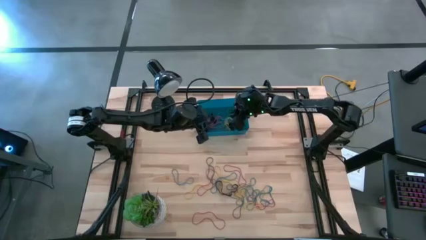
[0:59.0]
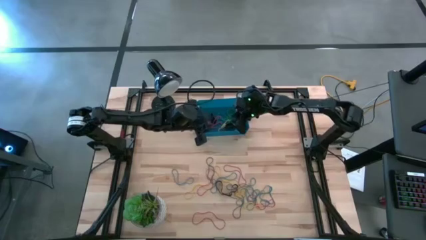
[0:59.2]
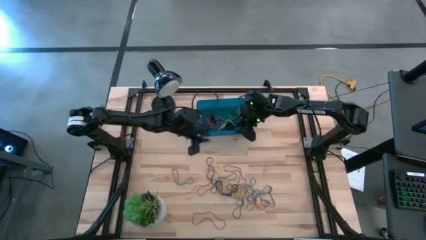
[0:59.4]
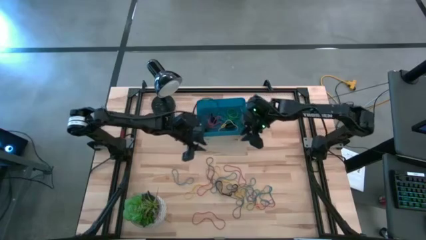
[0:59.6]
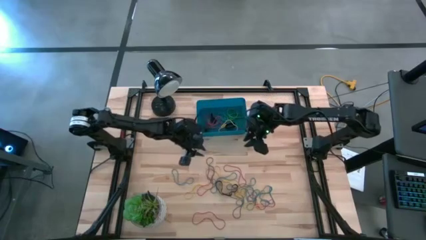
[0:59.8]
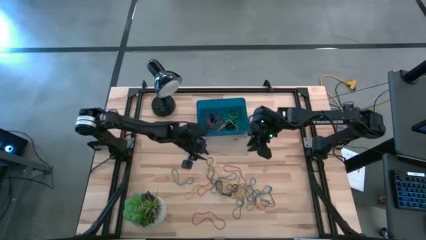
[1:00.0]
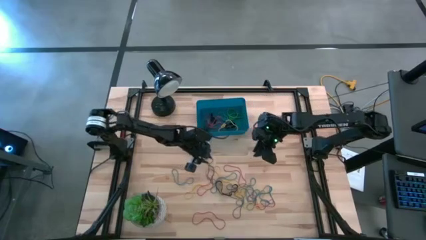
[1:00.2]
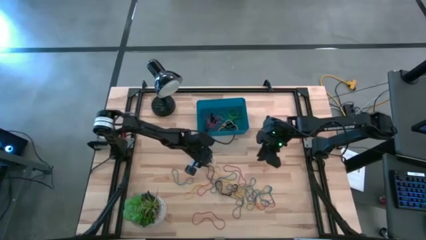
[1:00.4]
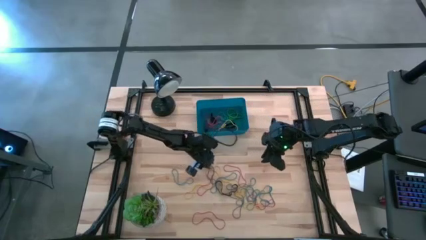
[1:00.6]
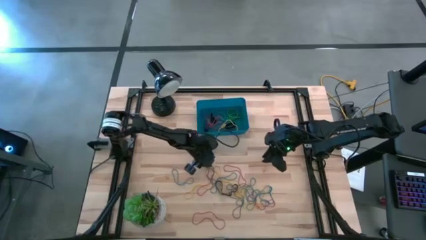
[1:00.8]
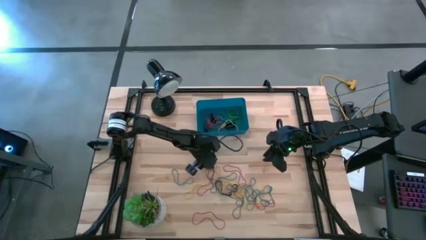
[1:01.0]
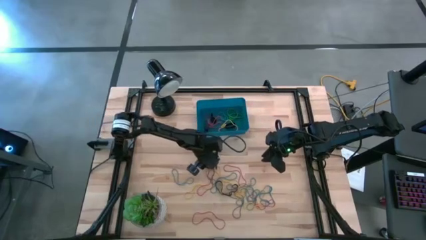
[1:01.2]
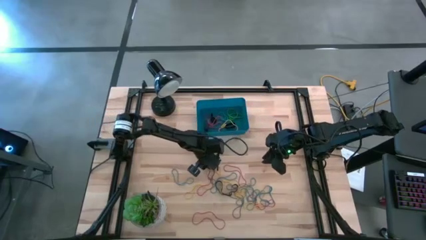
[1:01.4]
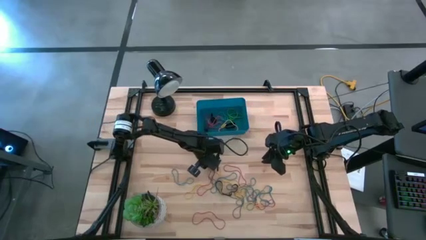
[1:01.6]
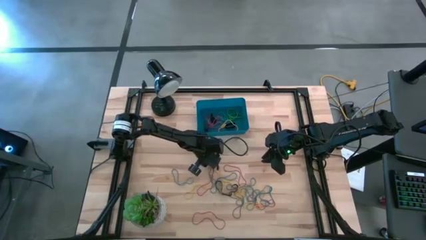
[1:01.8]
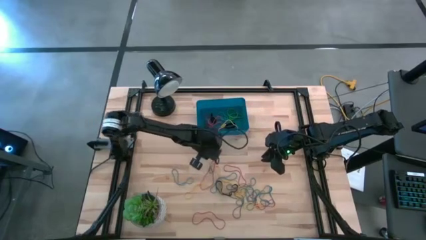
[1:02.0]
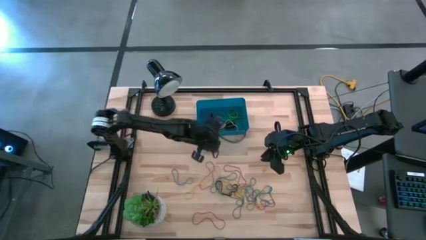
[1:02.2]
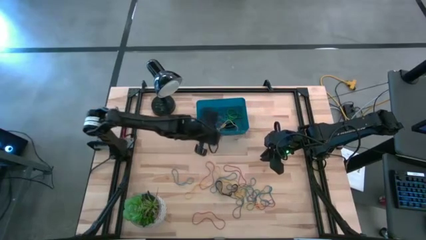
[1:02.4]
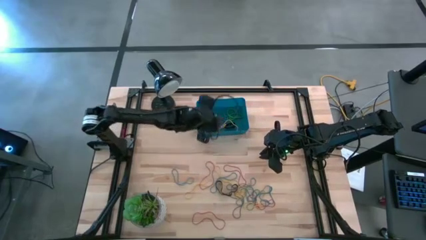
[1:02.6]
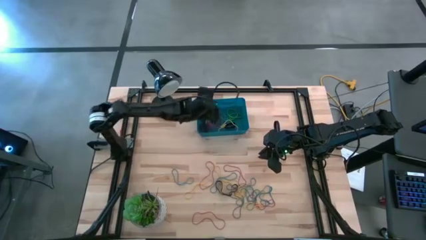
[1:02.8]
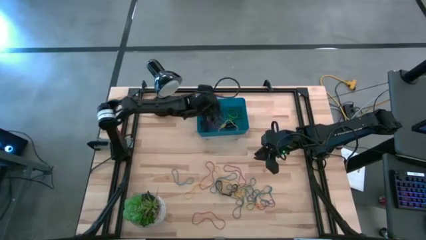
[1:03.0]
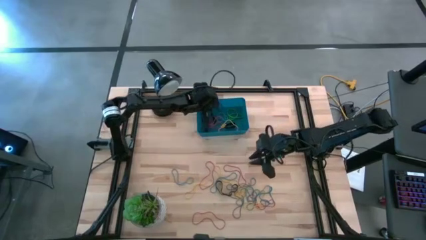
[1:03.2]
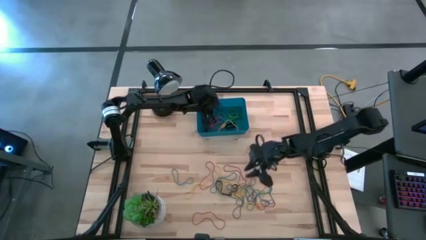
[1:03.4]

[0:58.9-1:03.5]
Task: Pick and place rubber bands into bin
Put the purple rubber band into the blue bin

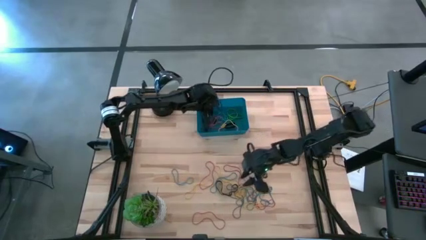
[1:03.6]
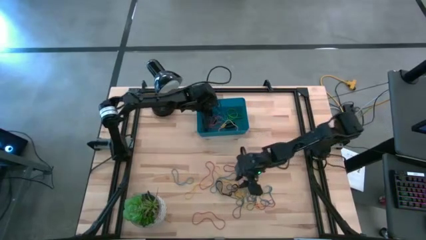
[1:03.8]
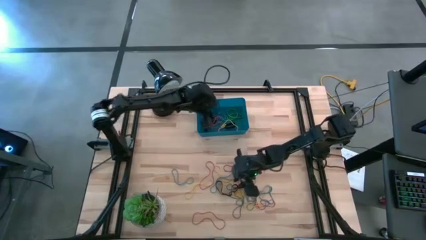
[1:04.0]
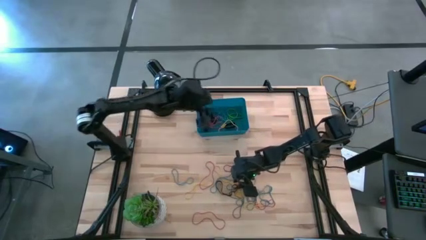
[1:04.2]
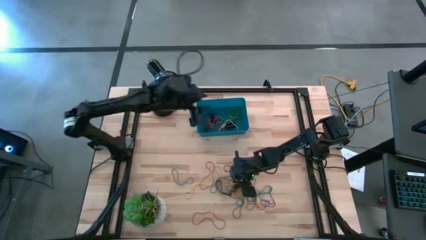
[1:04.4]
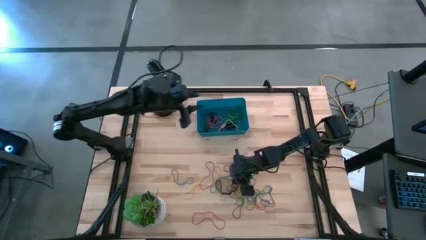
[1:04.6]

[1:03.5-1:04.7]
Put the black rubber band into the blue bin

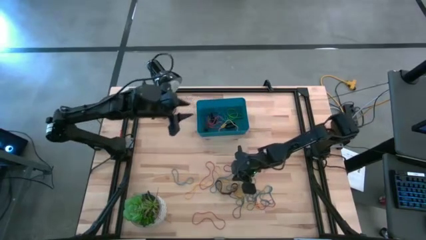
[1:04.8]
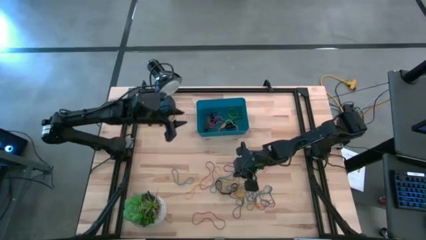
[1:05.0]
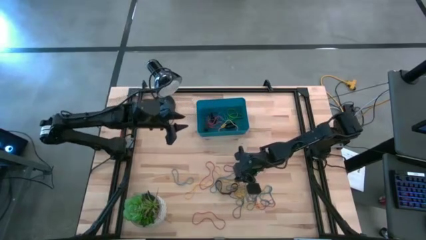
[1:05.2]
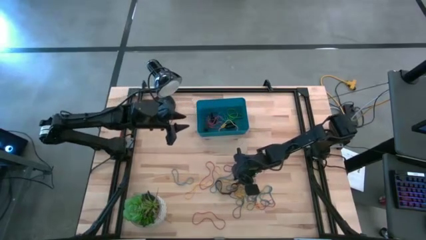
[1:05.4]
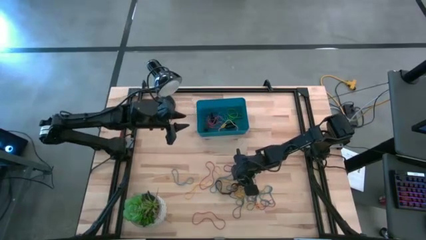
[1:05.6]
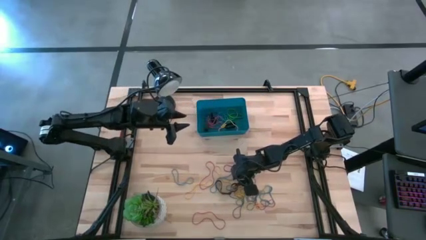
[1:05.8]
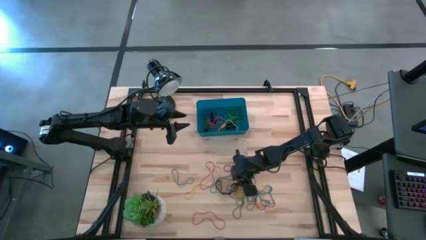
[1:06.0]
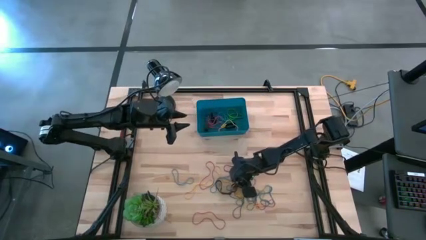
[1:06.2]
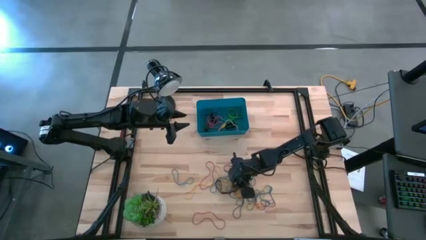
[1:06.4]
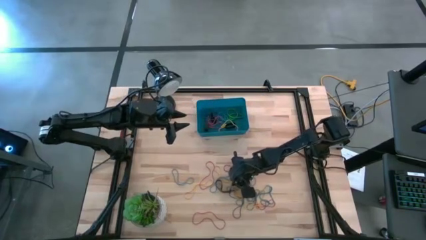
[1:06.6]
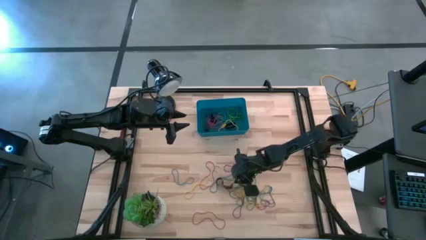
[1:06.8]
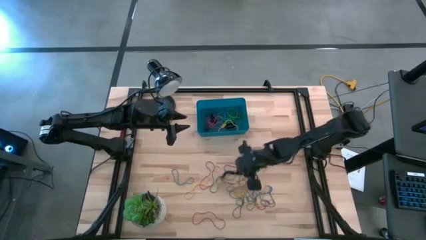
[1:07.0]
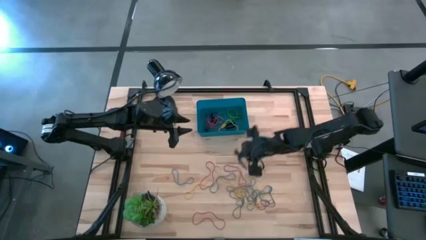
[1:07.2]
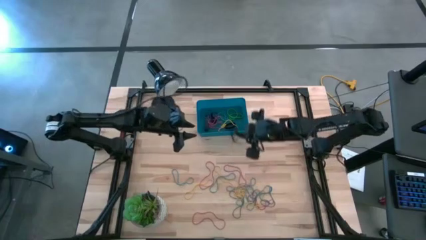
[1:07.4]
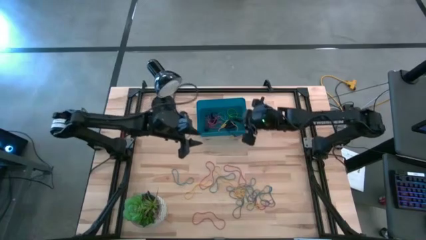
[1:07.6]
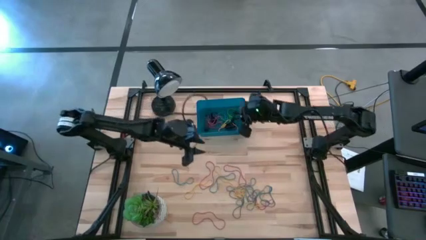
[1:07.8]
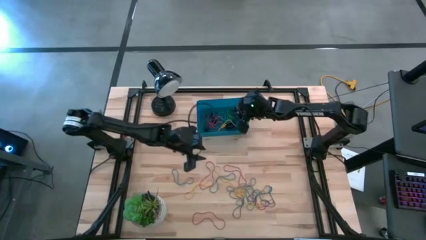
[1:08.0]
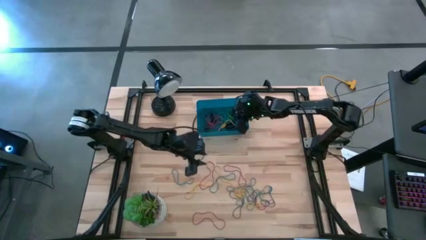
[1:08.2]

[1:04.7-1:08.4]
Put the black rubber band into the blue bin

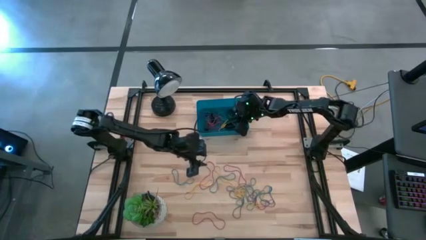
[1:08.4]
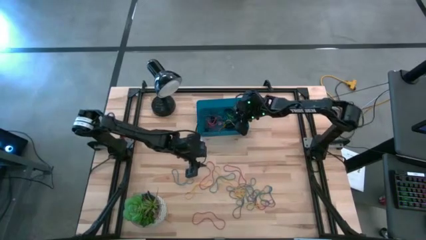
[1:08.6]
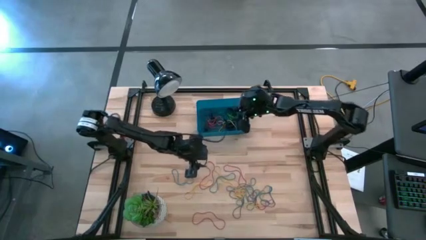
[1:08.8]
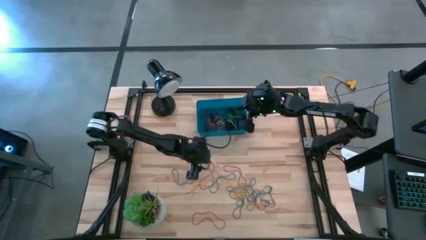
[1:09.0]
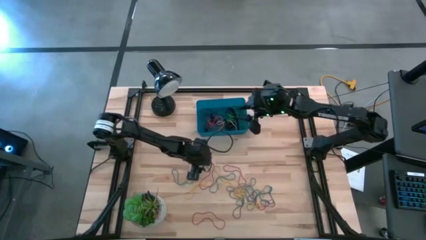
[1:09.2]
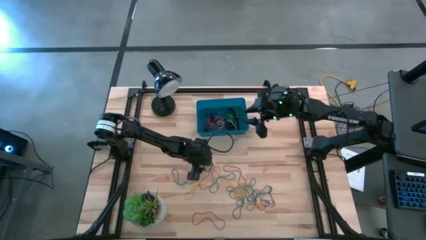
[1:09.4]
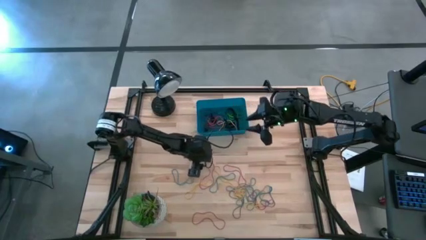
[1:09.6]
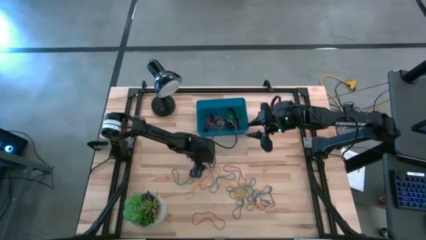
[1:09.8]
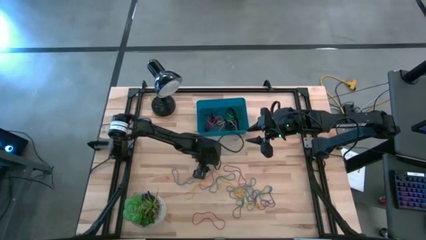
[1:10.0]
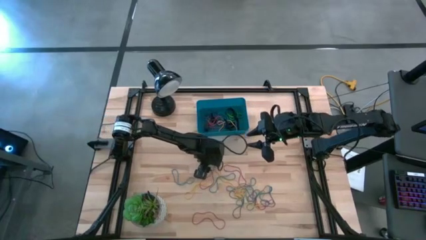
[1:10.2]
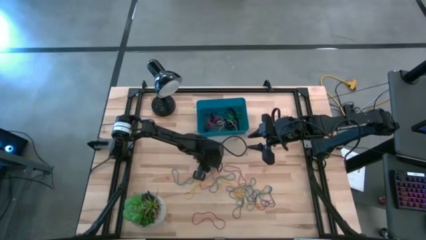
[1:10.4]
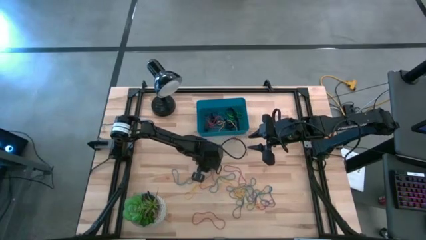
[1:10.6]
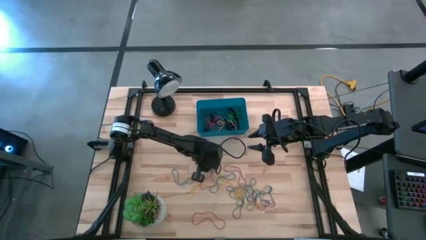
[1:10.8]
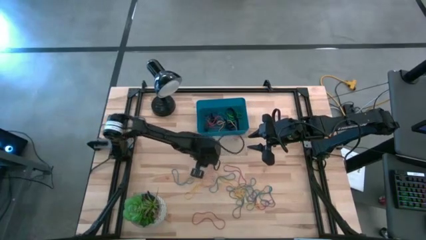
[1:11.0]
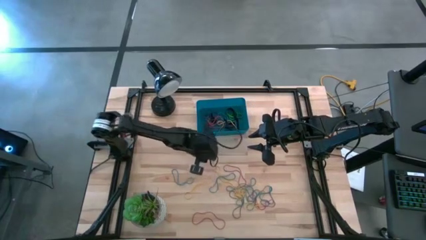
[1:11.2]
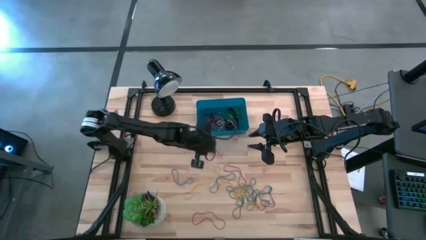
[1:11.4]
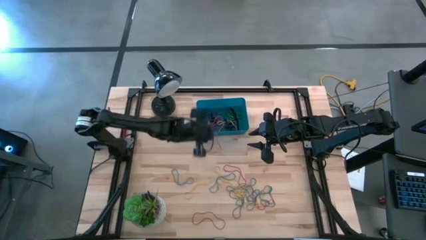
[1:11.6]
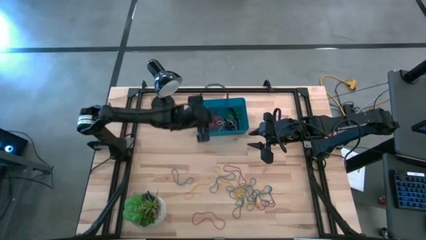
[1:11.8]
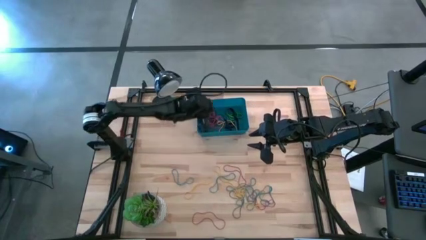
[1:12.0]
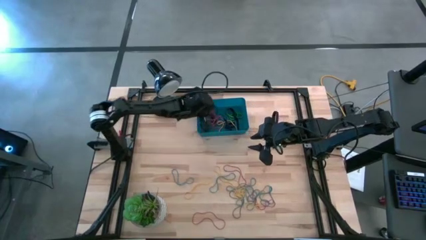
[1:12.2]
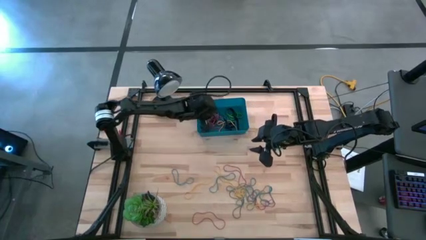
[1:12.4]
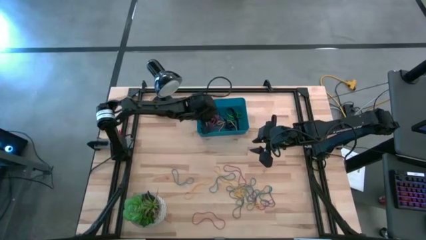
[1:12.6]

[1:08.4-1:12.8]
Put the red rubber band into the blue bin

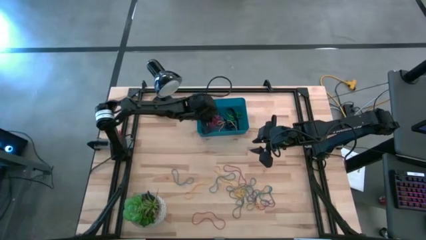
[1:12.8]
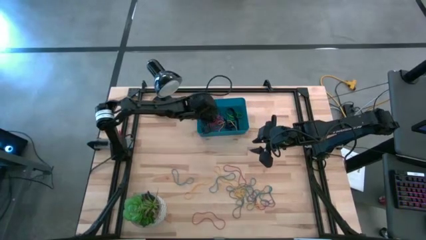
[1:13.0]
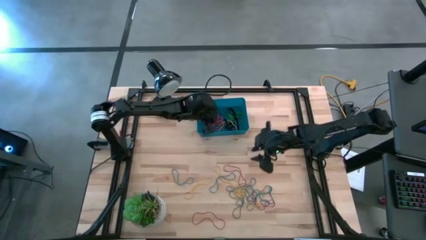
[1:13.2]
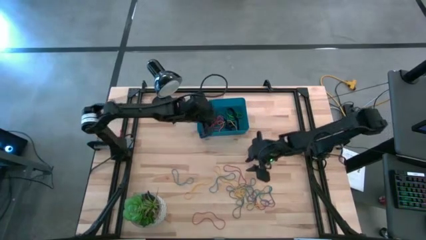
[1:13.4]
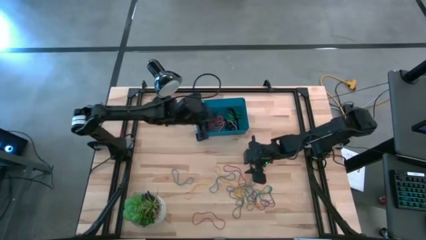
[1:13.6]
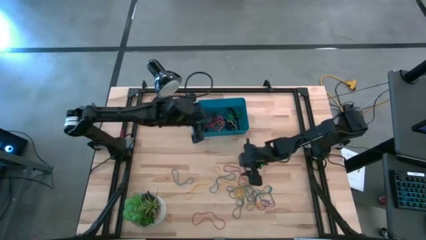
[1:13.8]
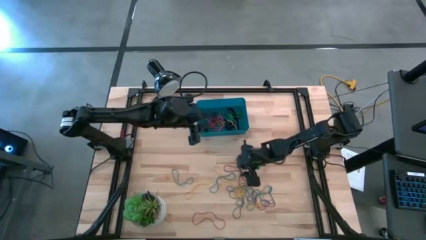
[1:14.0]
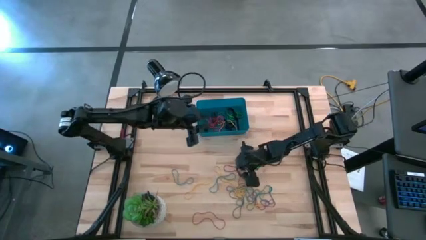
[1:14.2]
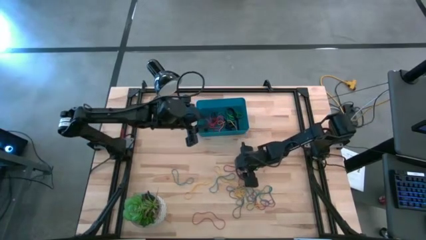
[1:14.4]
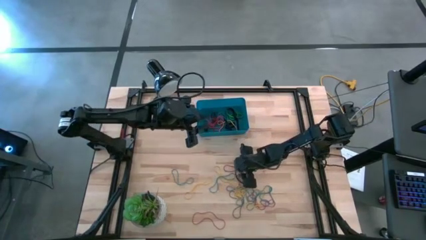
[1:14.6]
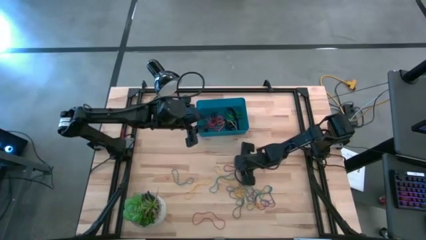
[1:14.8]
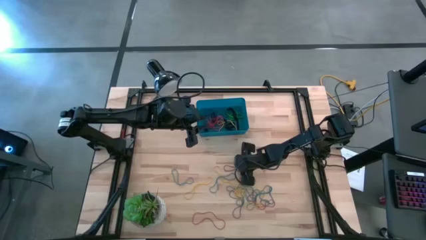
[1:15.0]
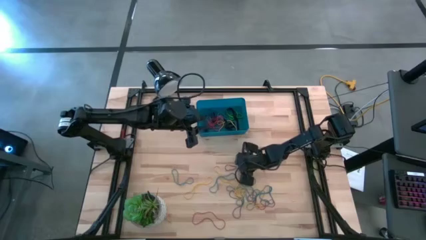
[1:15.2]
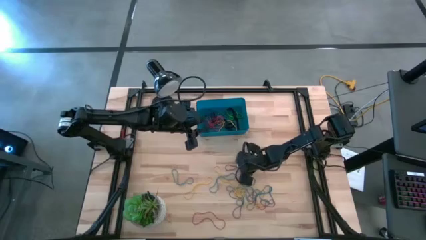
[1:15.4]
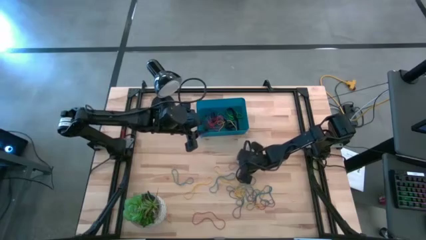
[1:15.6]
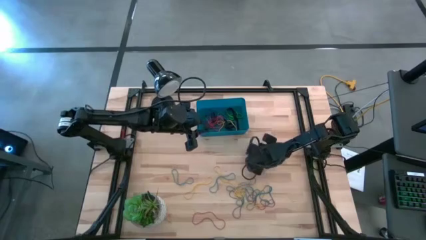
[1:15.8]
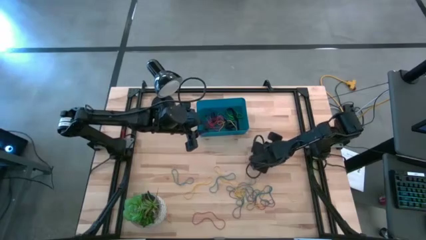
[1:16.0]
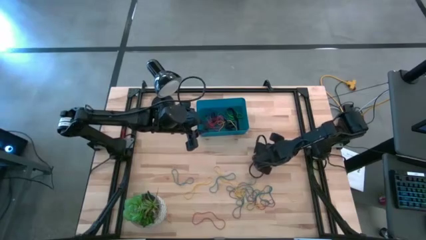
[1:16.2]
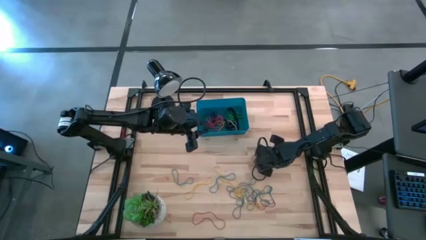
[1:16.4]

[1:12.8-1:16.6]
Put the red rubber band into the blue bin
